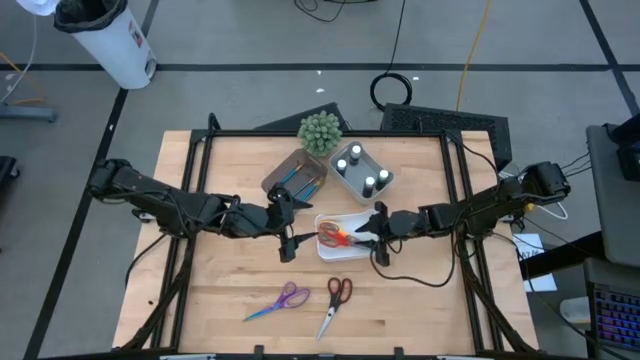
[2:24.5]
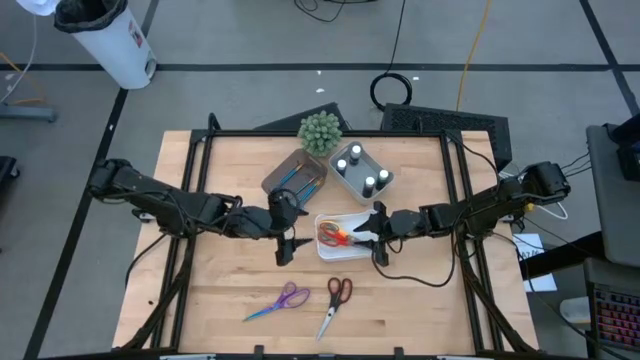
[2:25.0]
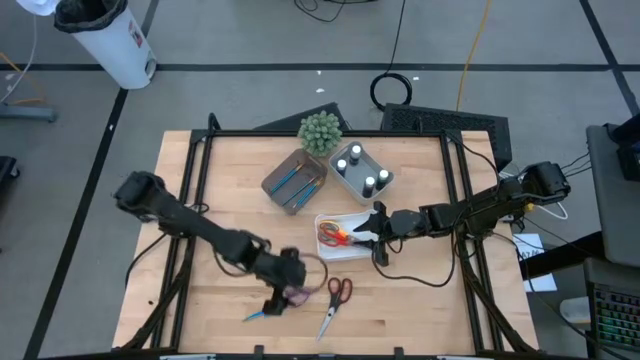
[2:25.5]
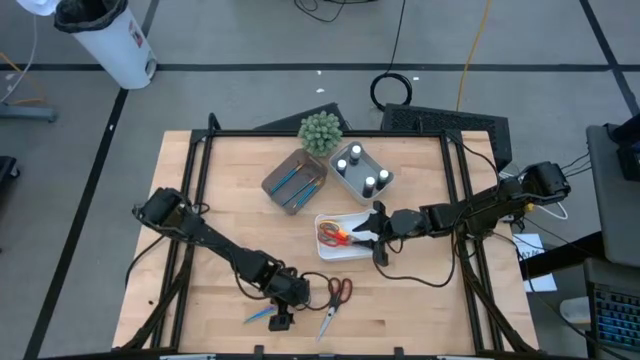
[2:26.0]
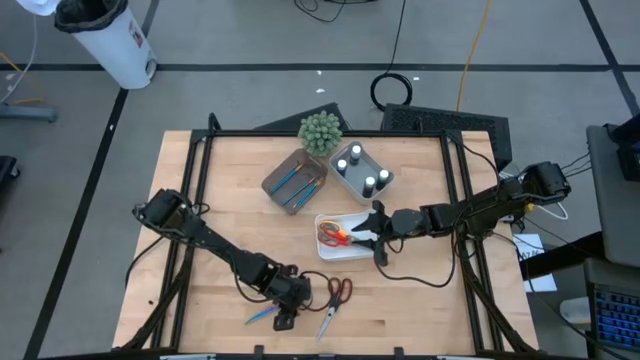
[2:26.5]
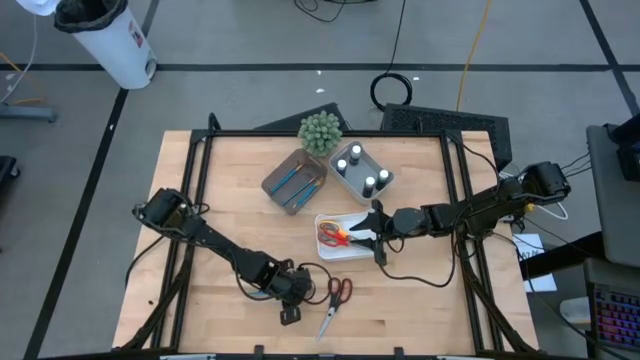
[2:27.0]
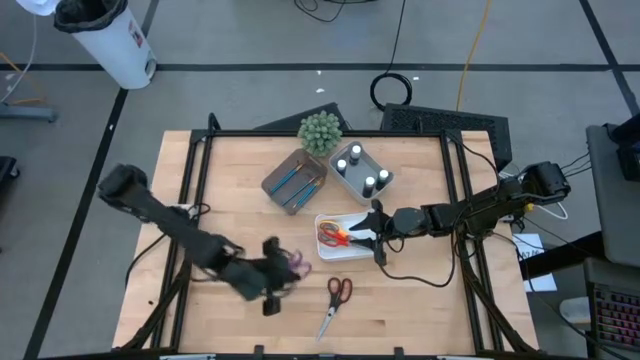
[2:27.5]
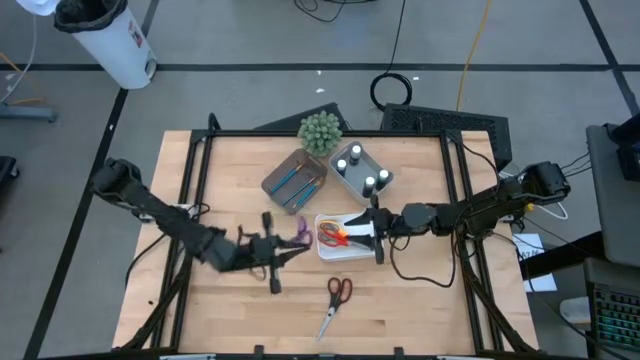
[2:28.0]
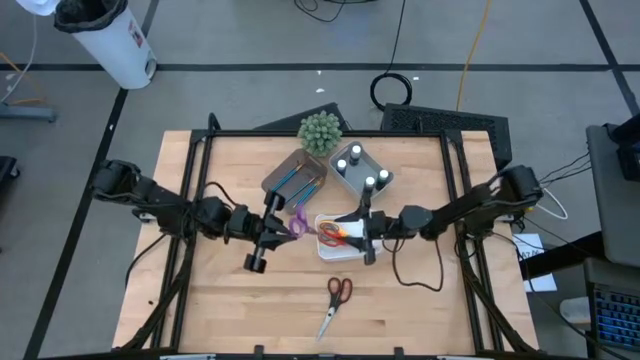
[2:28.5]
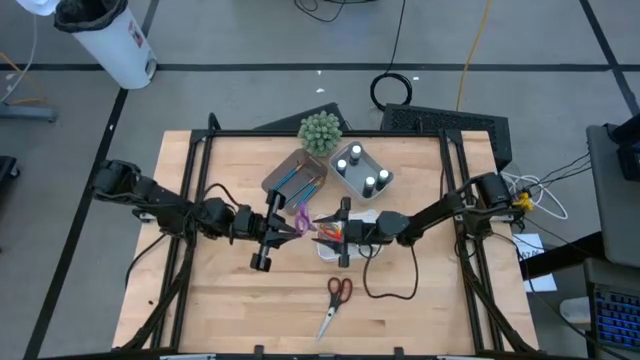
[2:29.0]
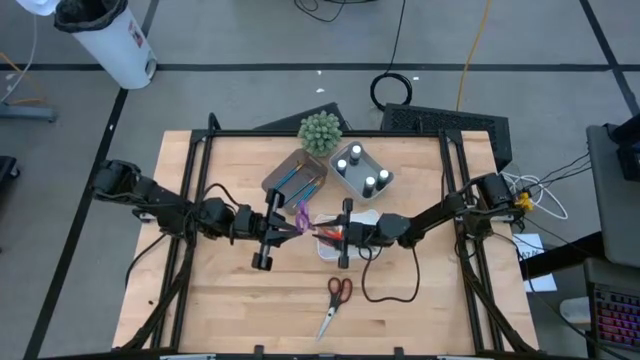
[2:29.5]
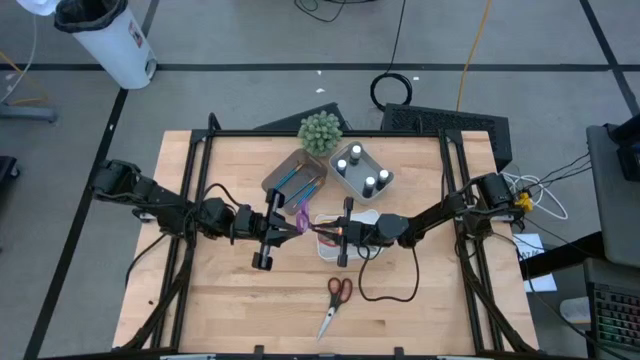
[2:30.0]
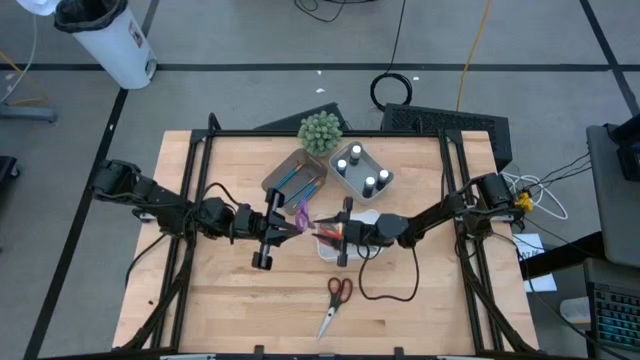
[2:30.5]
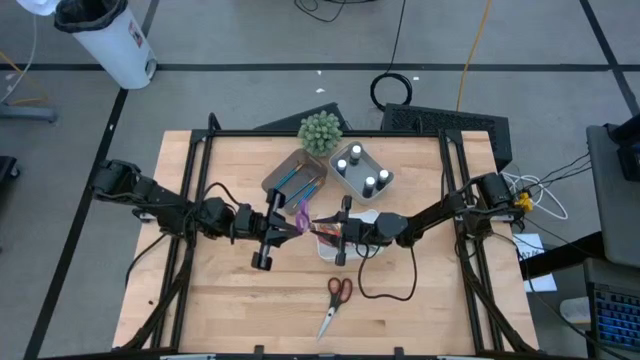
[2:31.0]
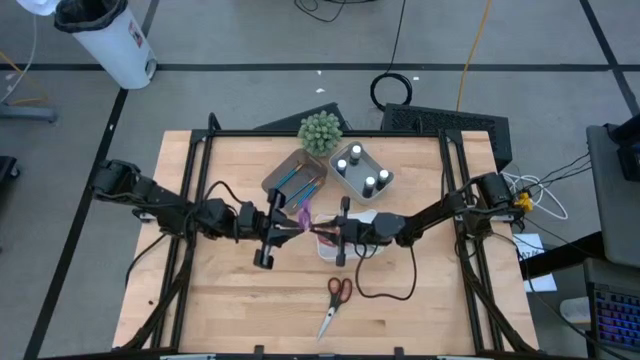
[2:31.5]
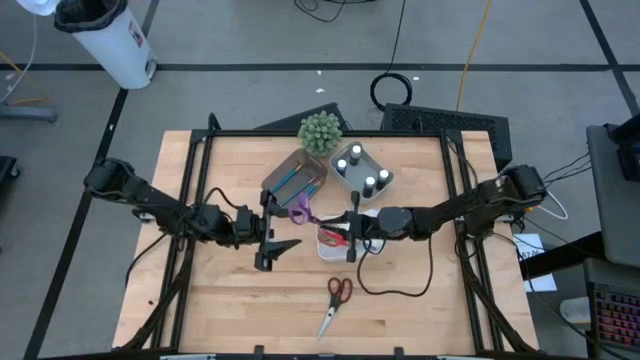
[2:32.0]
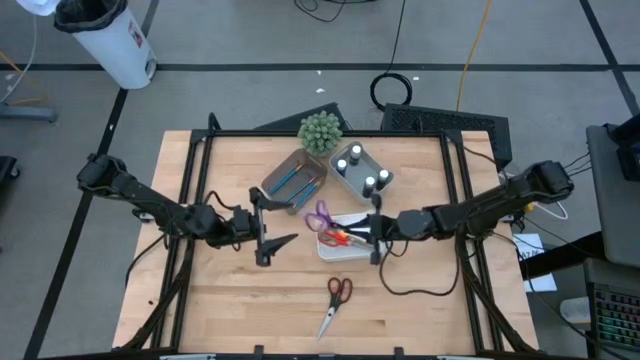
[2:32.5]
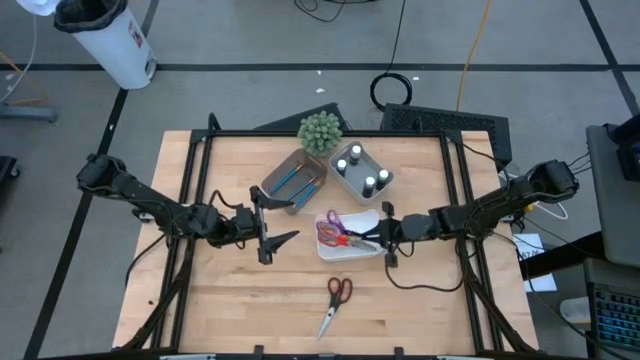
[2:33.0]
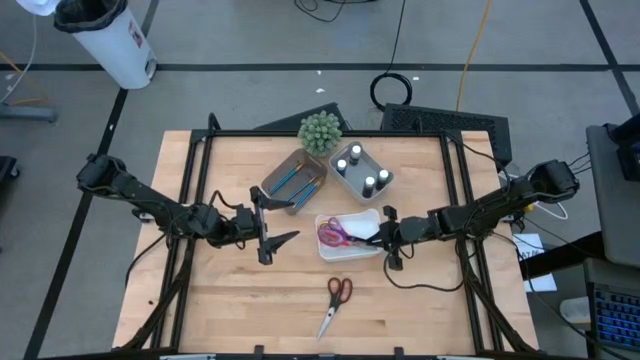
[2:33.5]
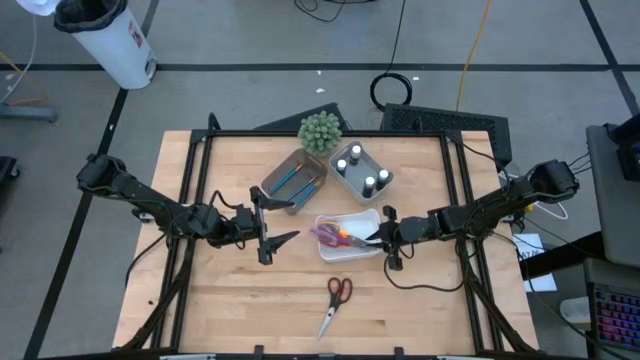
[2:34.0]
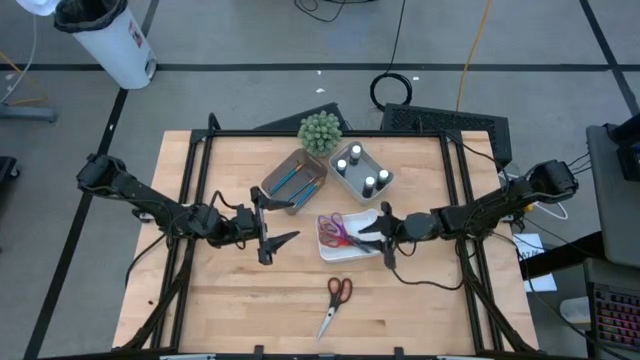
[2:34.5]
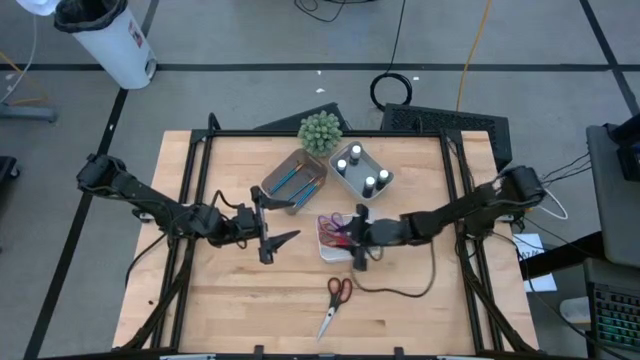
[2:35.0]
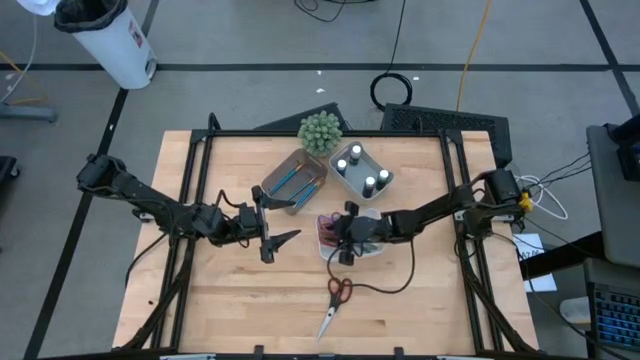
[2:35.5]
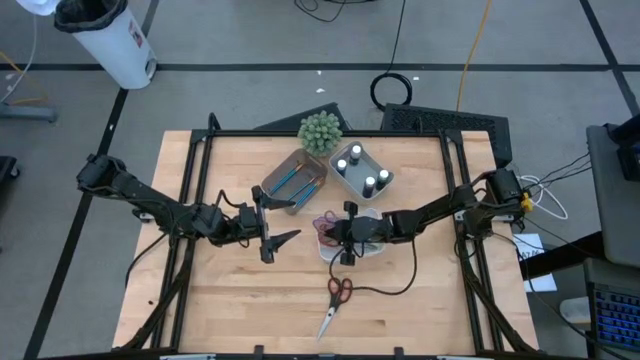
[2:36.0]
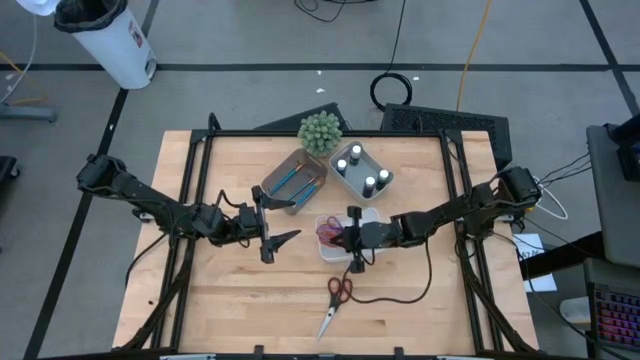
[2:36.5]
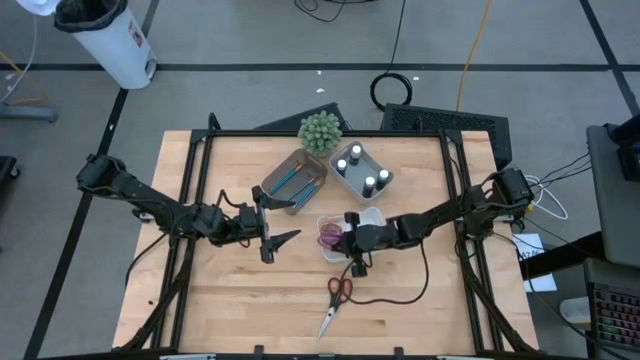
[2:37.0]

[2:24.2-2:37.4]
Task: Pick & Place Paint Supplies
Put the purple scissors into the white bin

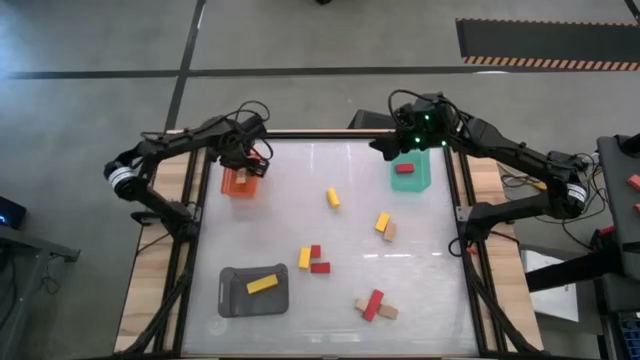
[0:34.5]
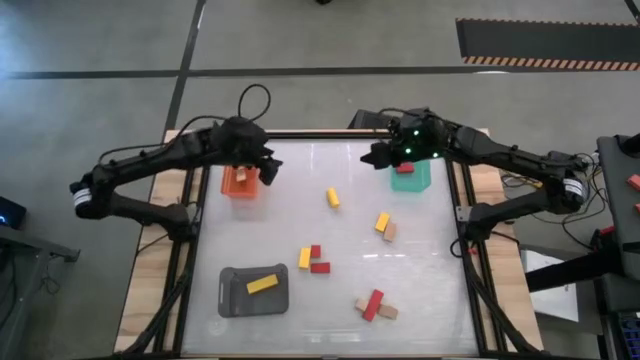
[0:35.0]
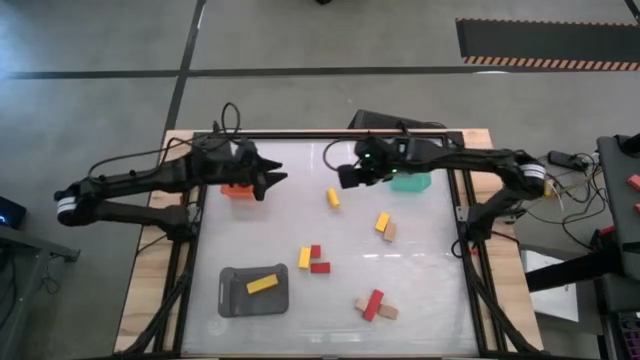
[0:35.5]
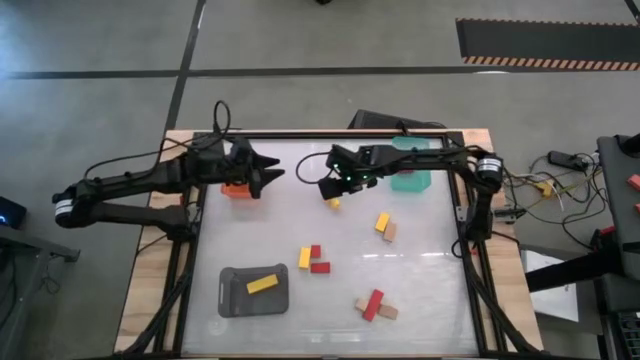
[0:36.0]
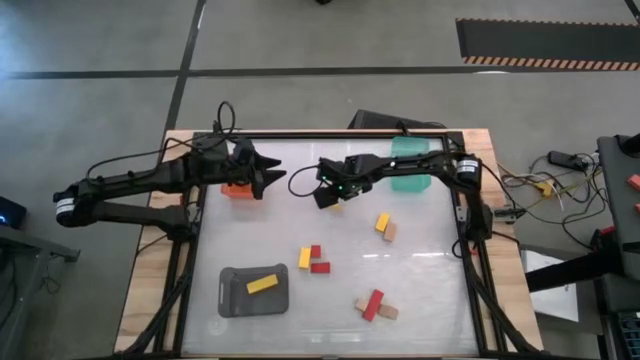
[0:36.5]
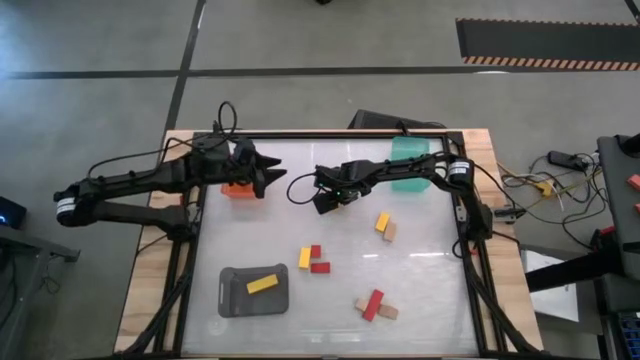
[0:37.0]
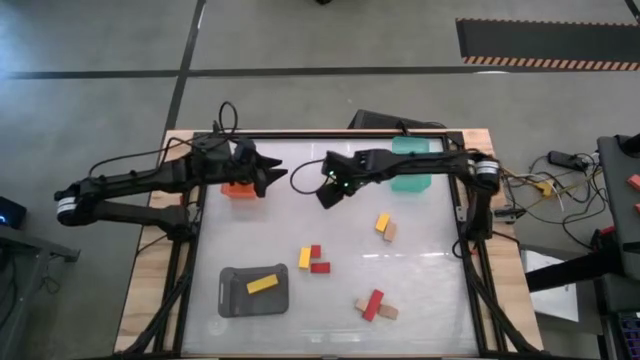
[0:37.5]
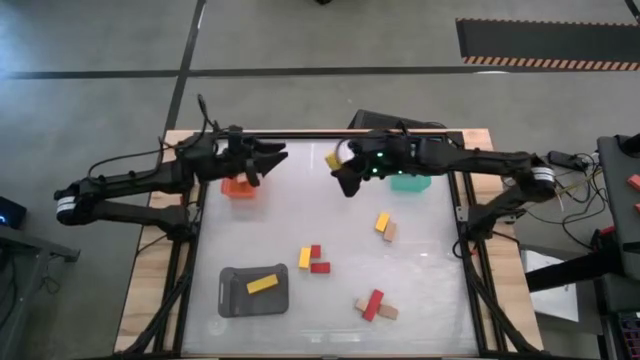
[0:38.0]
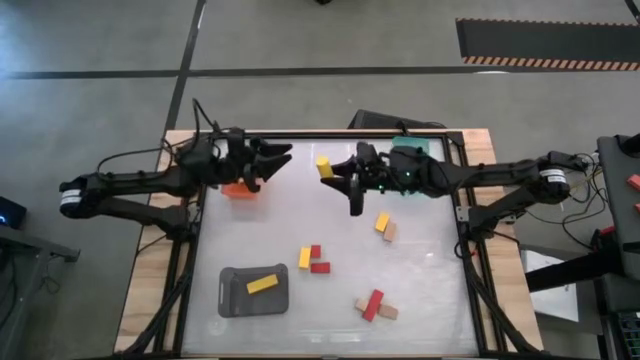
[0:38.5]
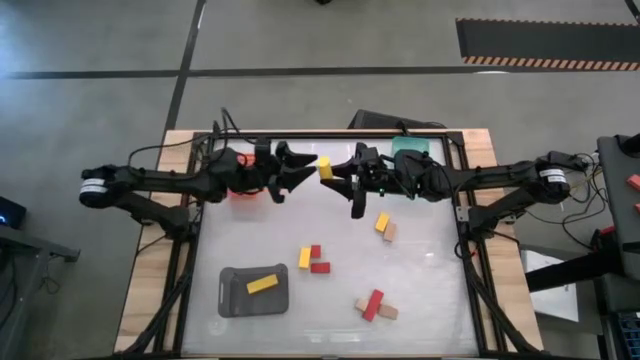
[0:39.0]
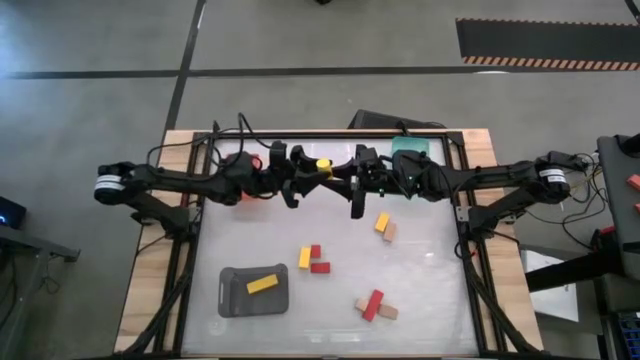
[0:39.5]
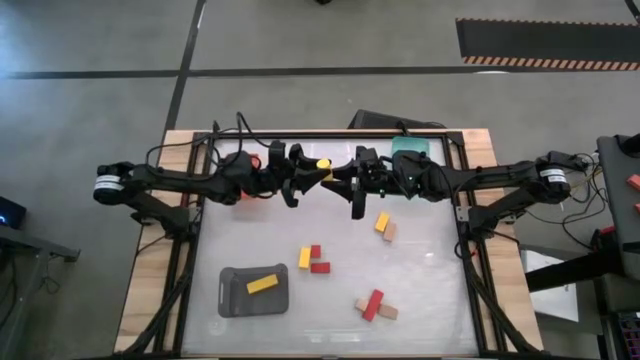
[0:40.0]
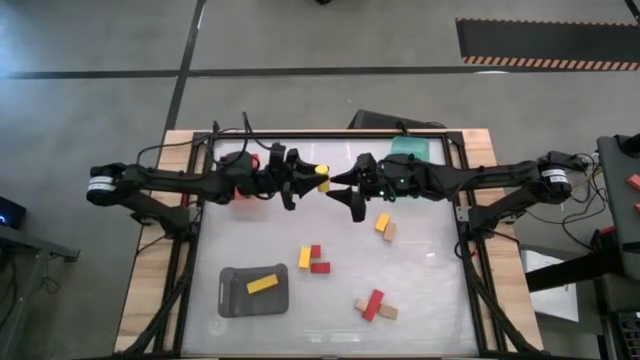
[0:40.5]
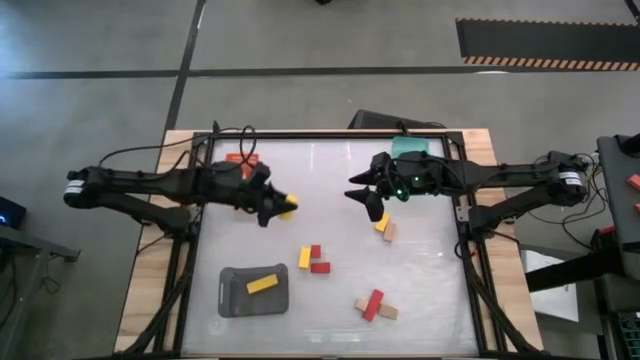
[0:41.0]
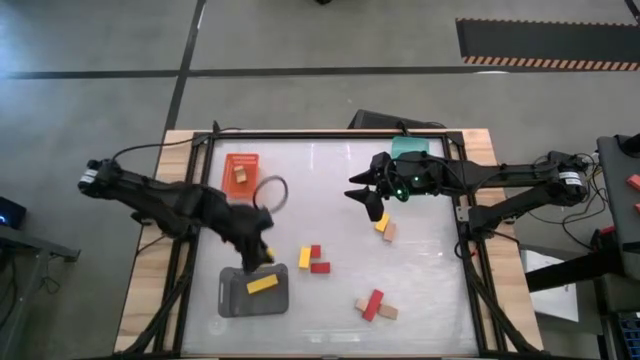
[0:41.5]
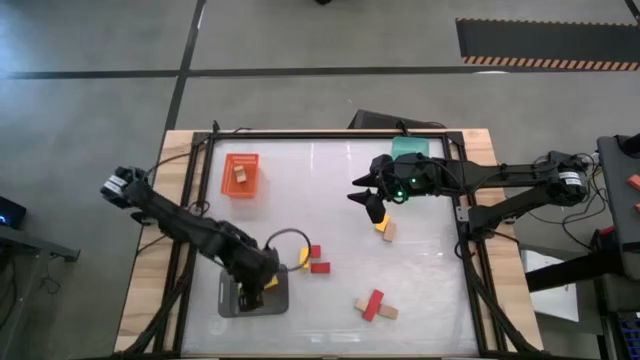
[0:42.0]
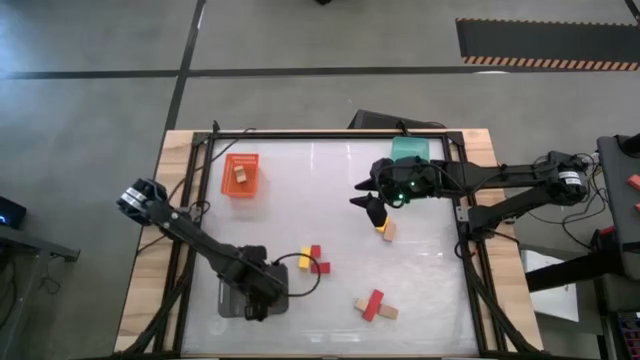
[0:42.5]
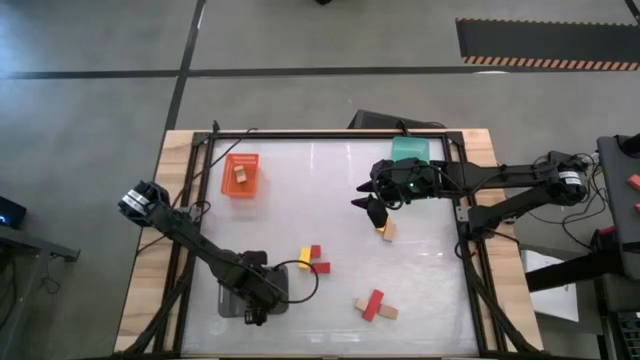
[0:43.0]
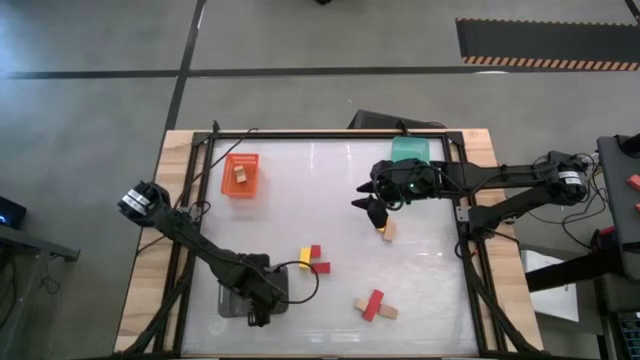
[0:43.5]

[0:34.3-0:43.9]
Task: Sort & place blocks by color
Put the yellow block into the black bin
